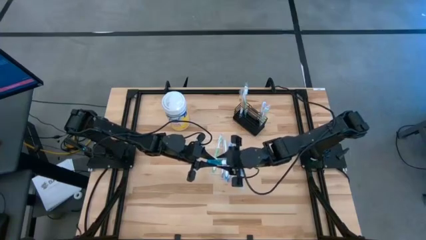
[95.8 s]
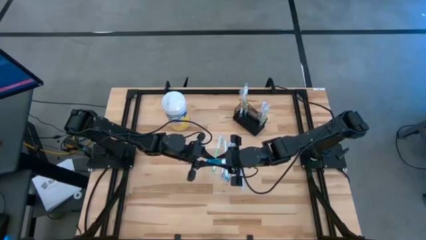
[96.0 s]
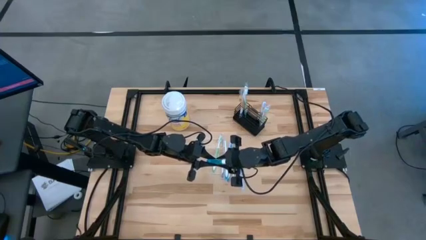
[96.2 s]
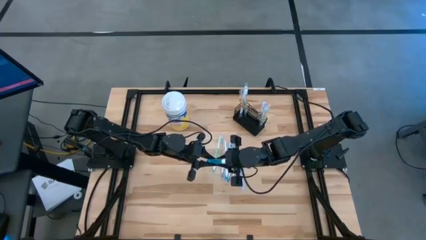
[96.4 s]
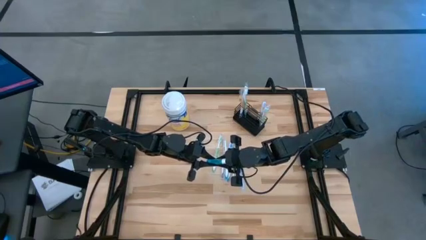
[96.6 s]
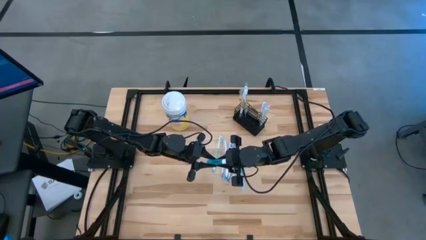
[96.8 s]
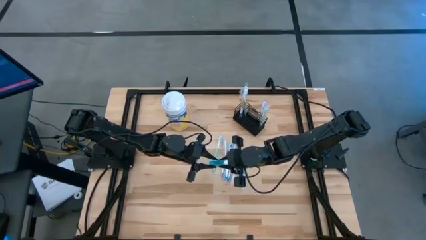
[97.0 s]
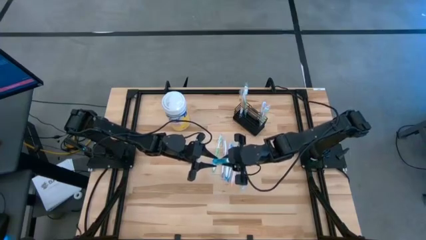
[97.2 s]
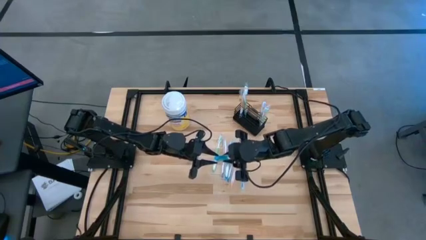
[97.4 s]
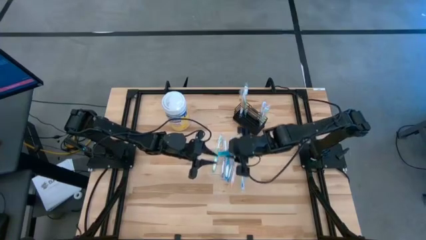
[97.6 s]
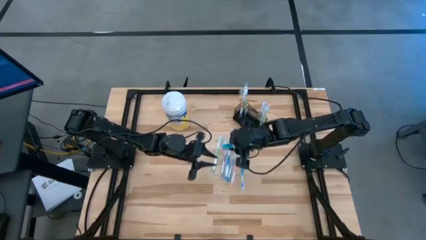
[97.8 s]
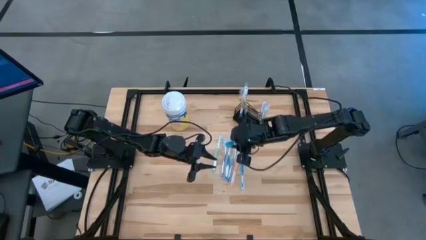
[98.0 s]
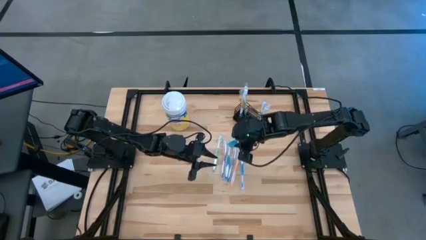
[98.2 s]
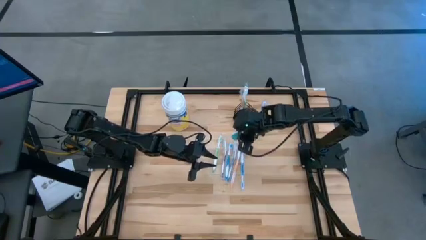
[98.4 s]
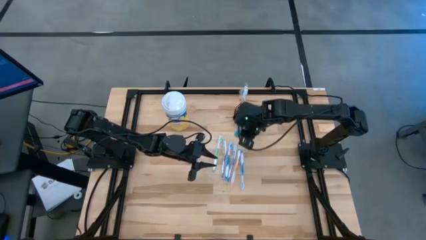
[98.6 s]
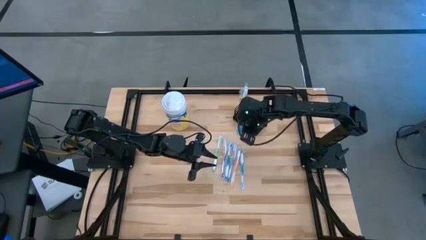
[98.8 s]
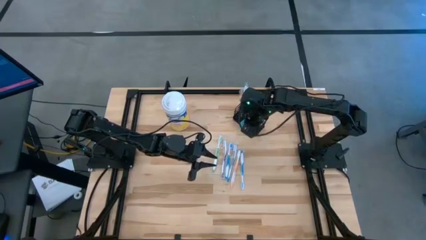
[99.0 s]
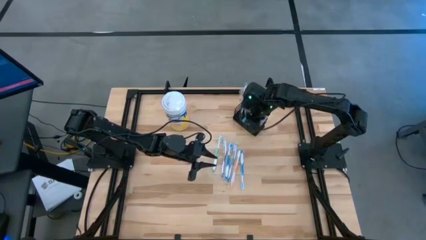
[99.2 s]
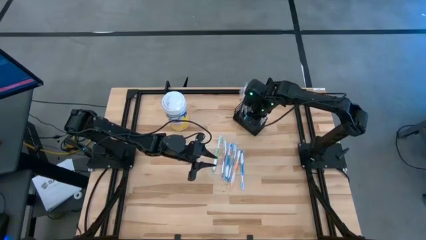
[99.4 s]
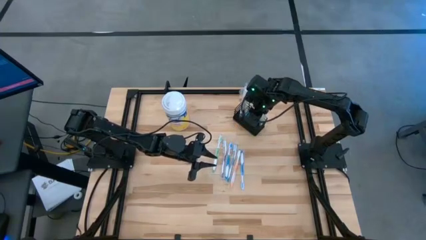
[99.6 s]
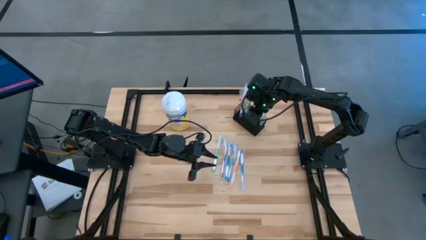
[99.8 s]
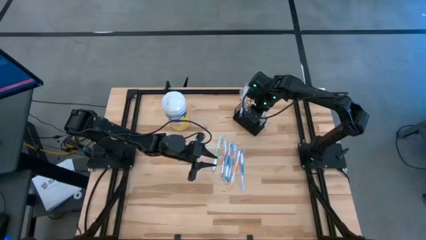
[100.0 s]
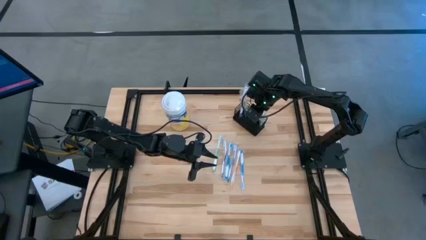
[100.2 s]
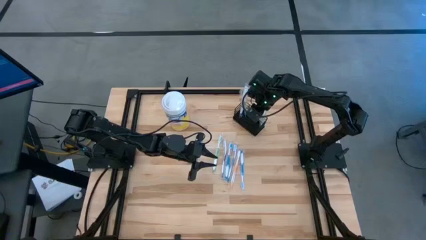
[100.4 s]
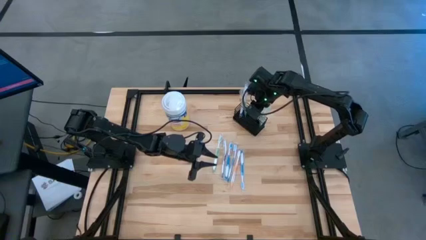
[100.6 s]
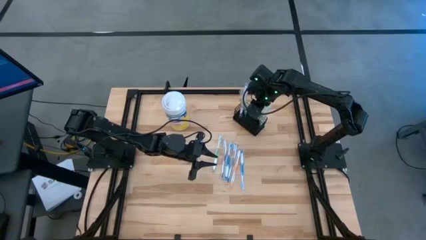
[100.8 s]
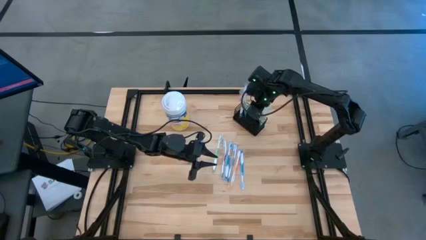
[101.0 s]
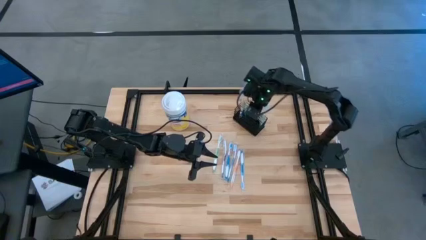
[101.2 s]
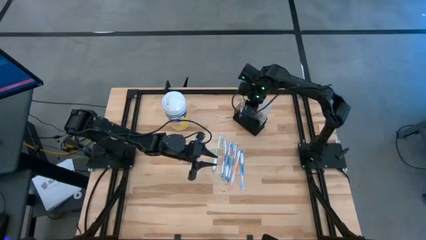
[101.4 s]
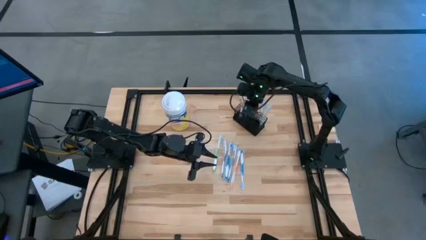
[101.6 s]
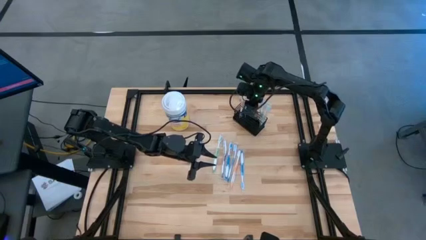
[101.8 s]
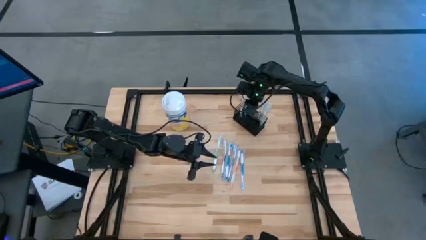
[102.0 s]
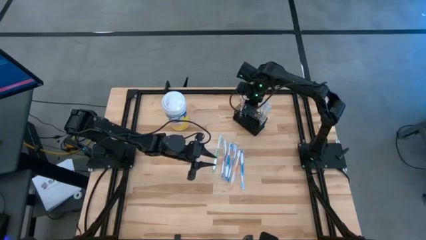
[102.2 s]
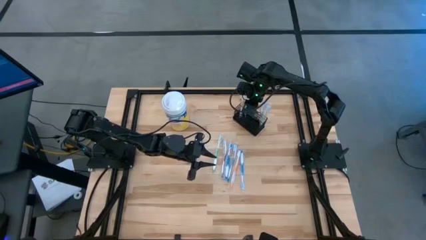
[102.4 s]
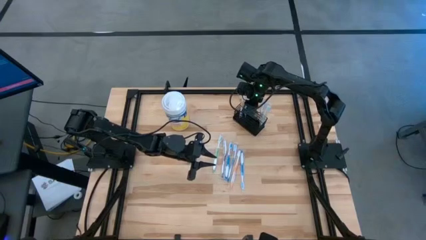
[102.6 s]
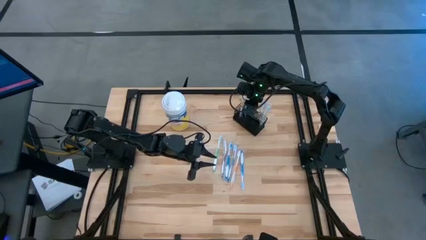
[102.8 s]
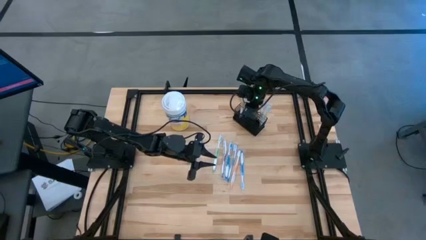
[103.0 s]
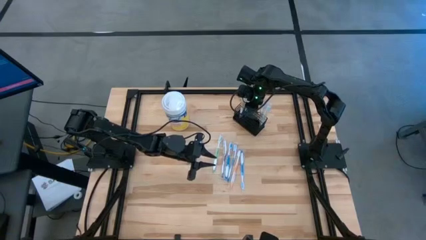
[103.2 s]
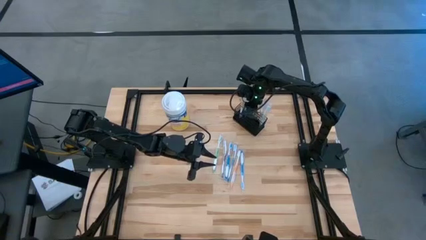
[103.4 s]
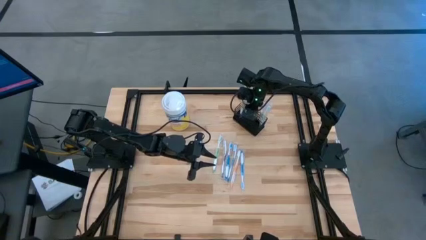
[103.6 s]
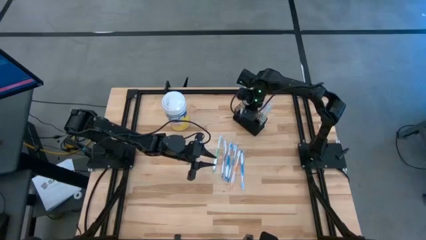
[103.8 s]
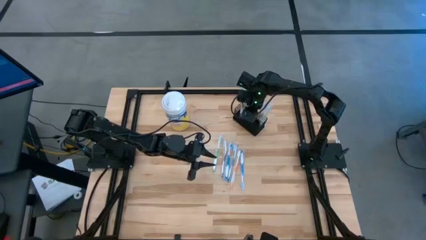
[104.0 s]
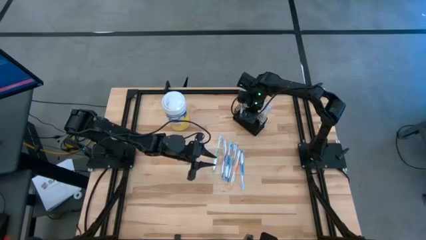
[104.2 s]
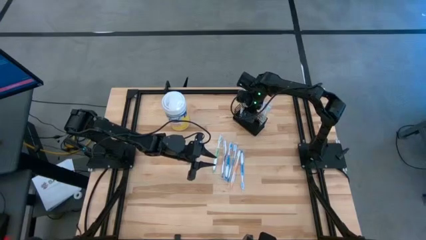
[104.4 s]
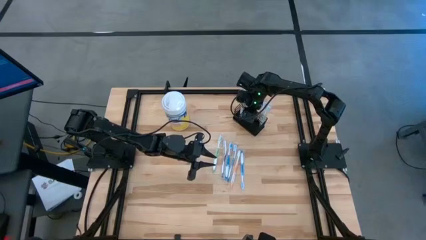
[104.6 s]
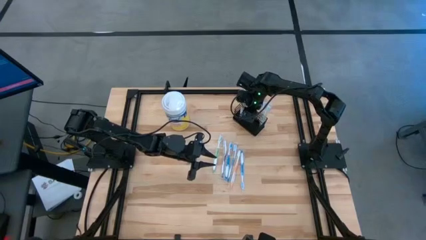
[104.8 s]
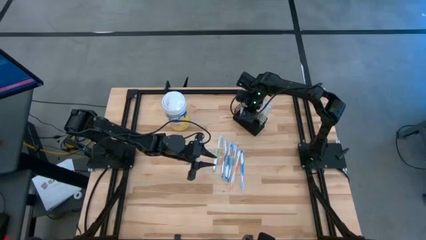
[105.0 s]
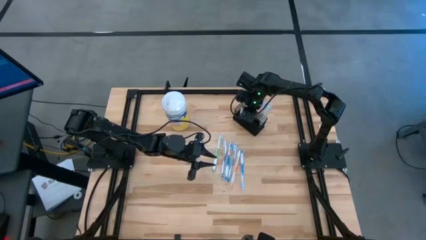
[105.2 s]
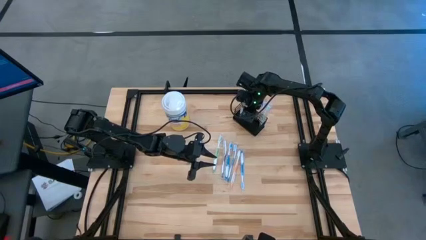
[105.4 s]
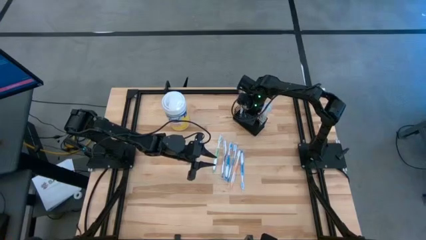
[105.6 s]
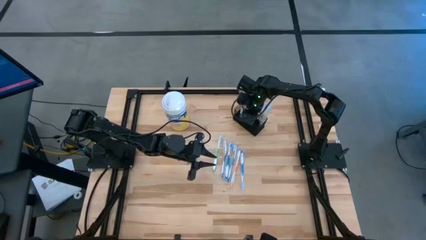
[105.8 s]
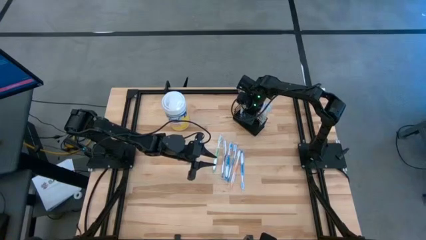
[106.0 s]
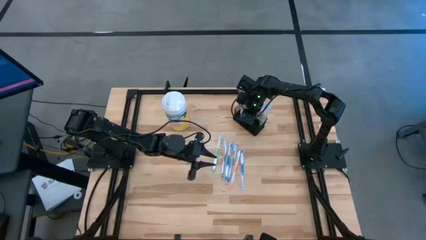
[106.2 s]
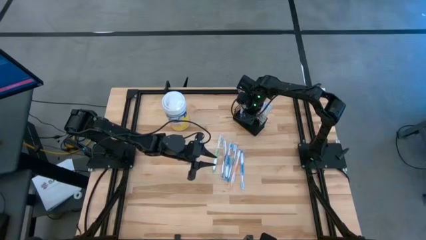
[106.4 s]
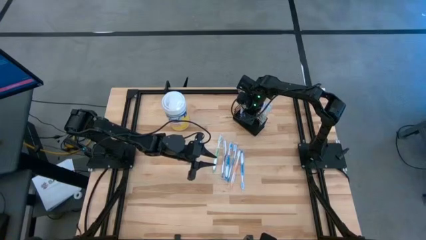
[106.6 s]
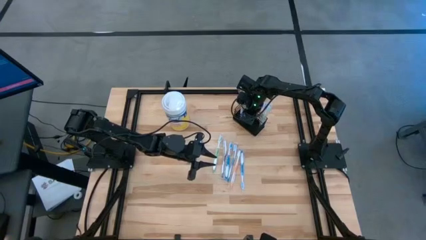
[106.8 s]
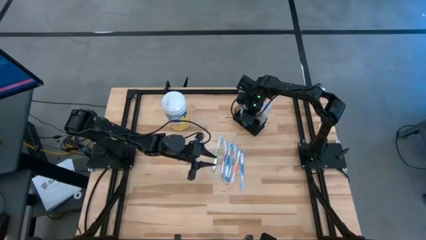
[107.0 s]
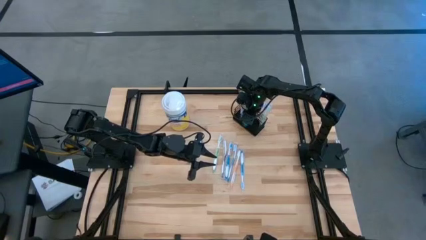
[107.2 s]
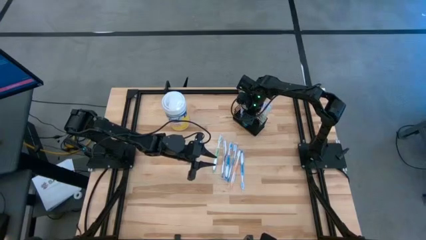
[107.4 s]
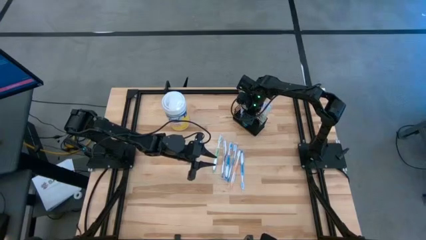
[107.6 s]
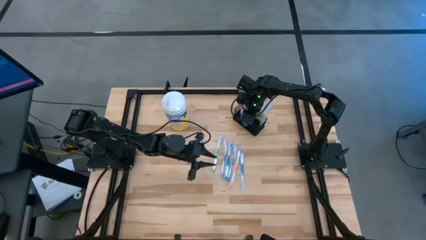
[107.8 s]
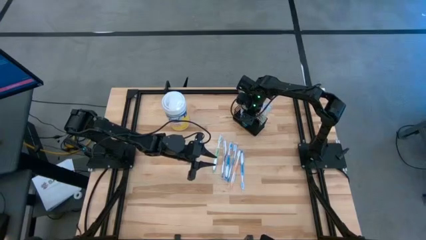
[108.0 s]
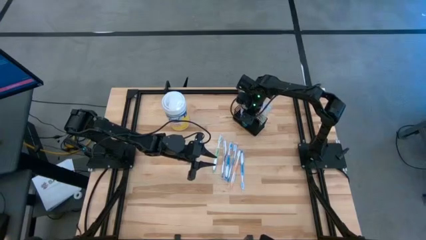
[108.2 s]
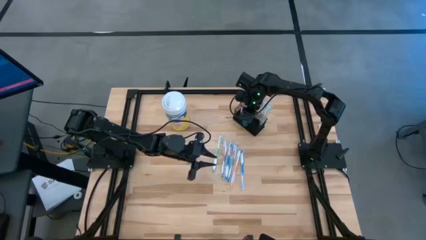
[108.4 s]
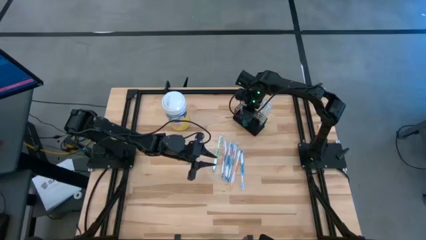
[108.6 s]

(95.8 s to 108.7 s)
Task: Pick & Place toothbrushing station
Put the right blue mouthwash into the black wire organizer

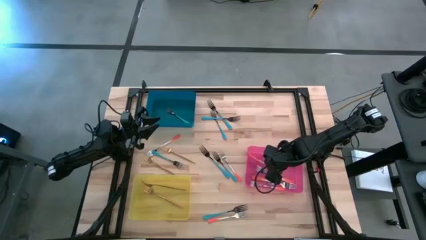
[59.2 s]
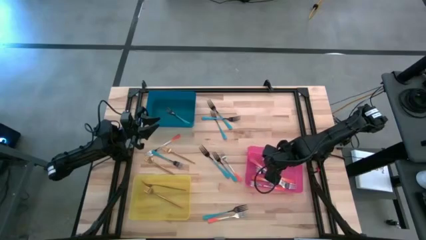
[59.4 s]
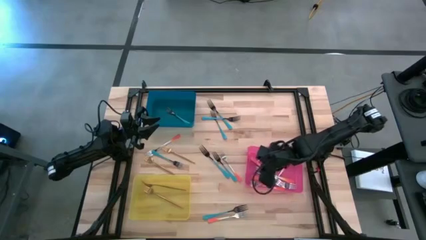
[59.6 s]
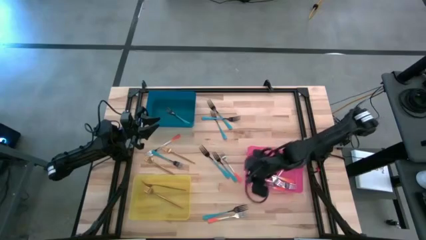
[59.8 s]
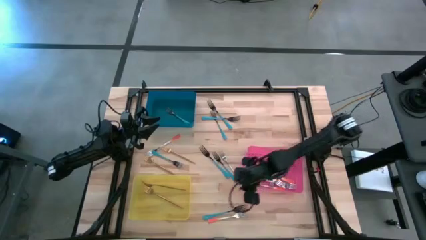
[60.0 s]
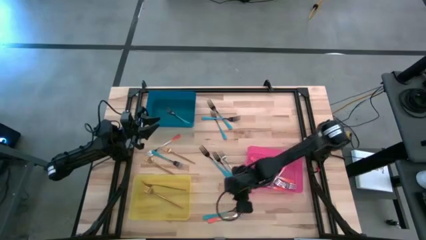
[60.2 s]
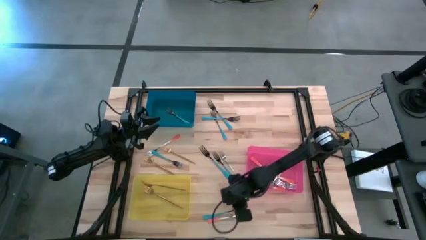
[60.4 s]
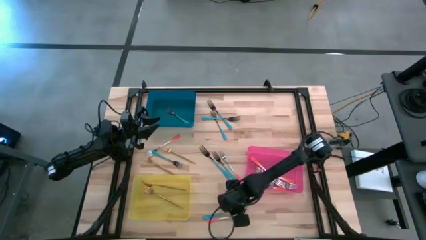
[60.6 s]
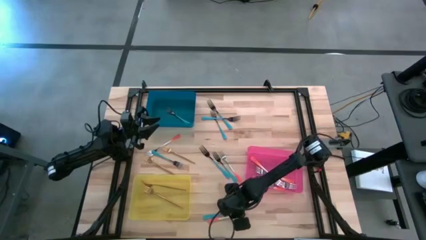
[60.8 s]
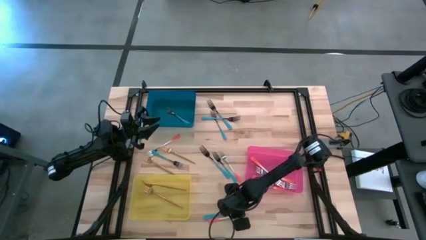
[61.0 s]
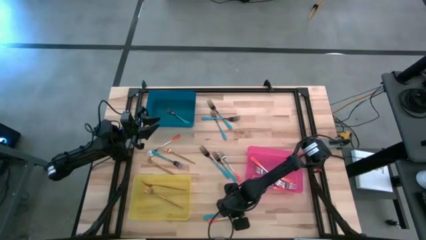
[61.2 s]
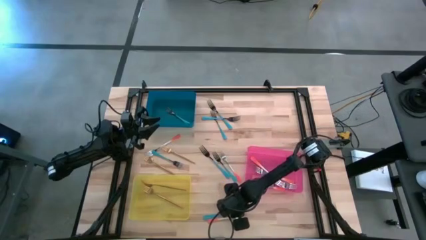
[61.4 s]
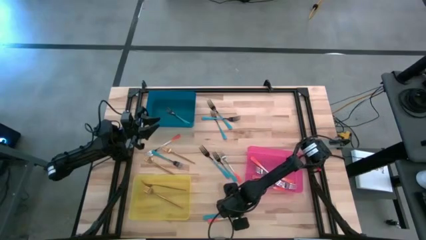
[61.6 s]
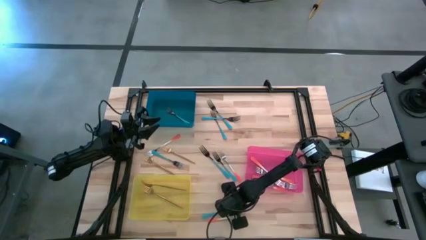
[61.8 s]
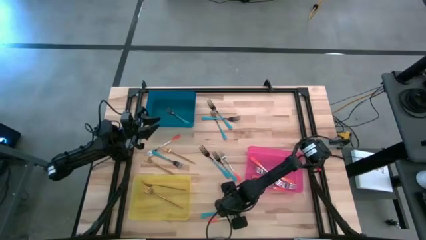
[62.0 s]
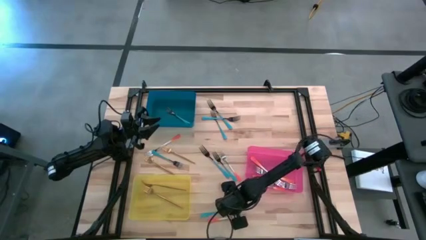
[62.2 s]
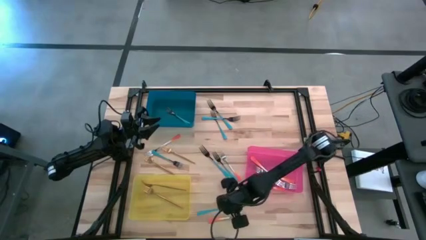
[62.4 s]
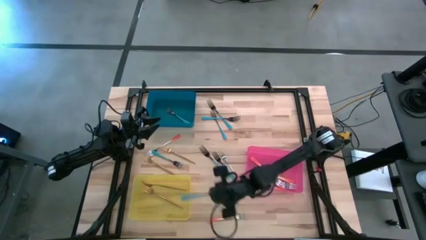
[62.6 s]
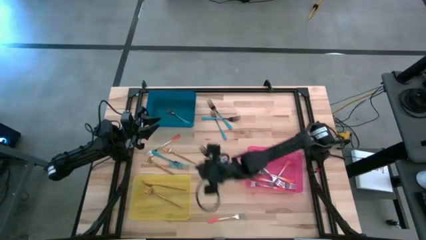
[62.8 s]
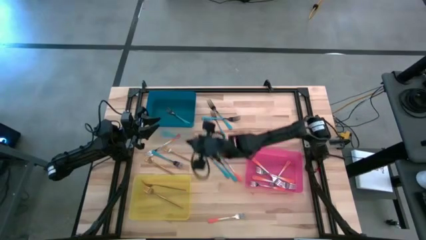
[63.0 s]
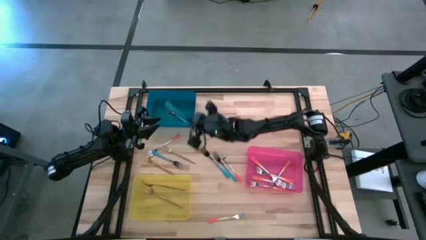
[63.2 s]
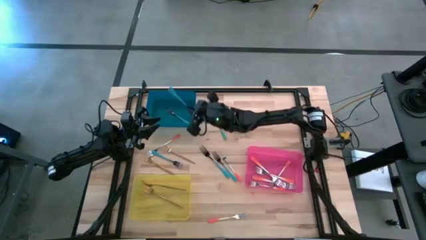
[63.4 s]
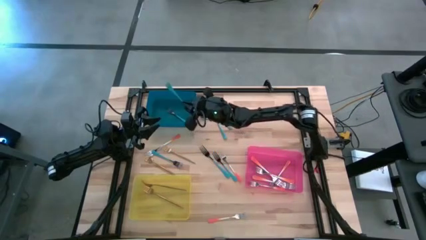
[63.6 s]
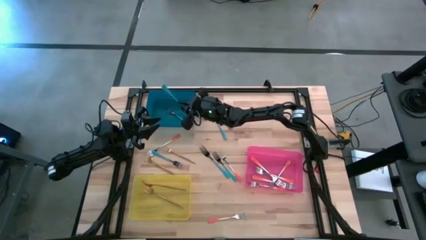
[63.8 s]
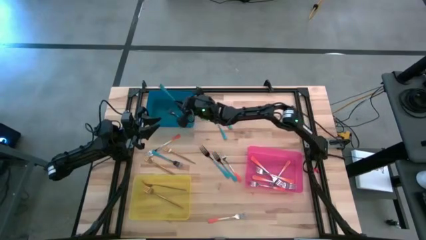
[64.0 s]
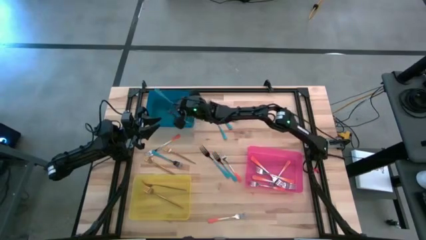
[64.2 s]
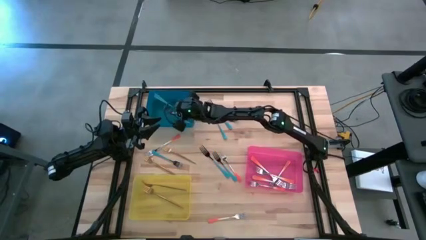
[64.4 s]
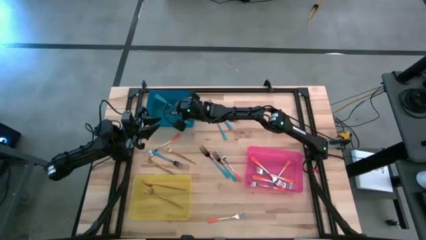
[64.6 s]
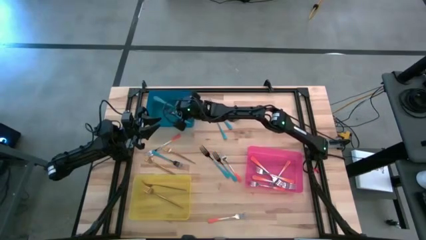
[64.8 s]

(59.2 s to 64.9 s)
Task: Sort silverware by color (type)
Put the blue fork into the blue bin
